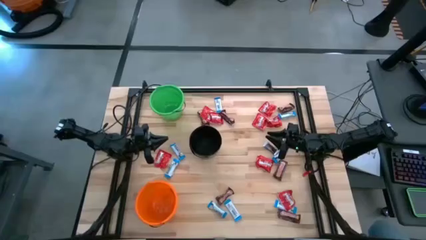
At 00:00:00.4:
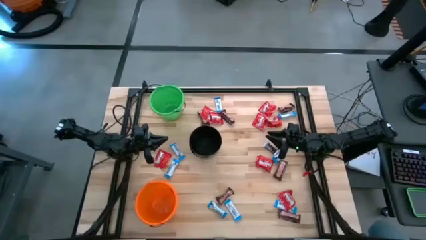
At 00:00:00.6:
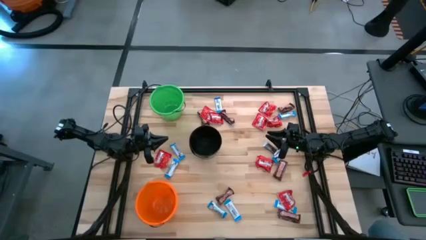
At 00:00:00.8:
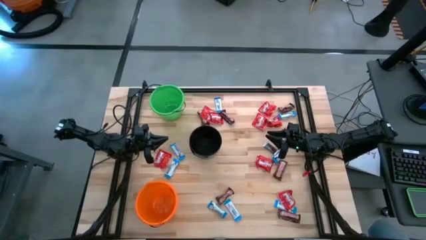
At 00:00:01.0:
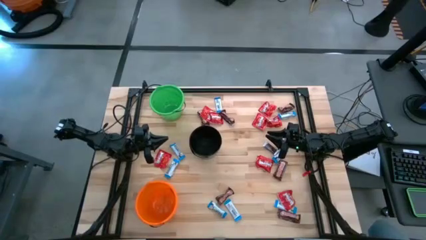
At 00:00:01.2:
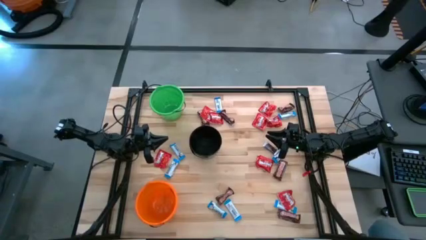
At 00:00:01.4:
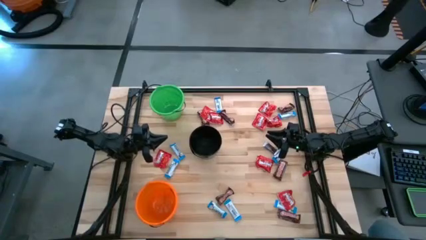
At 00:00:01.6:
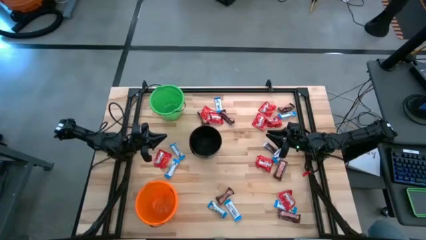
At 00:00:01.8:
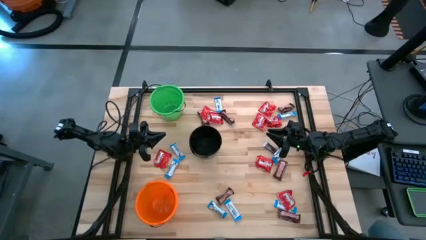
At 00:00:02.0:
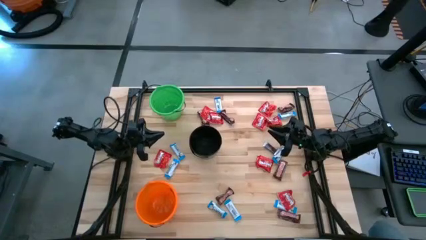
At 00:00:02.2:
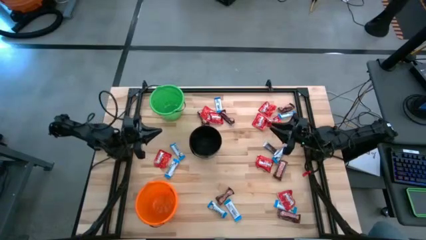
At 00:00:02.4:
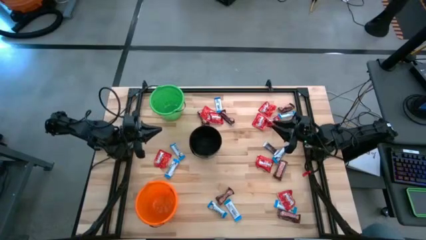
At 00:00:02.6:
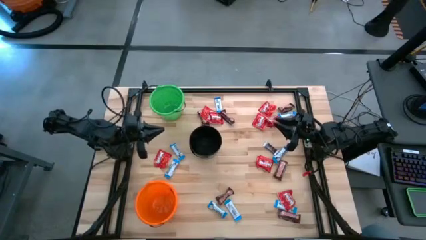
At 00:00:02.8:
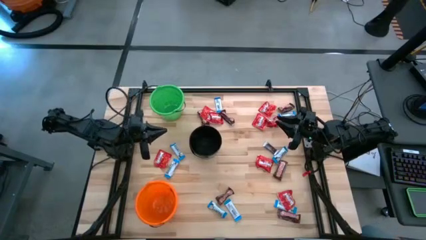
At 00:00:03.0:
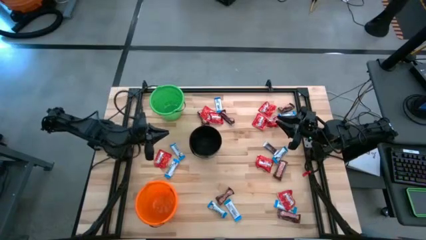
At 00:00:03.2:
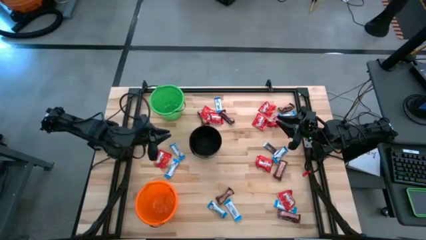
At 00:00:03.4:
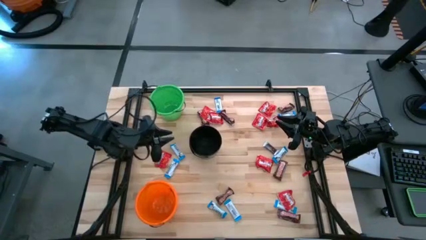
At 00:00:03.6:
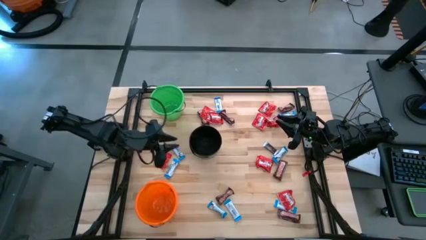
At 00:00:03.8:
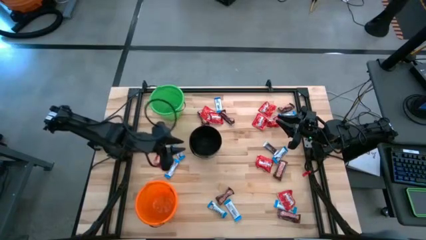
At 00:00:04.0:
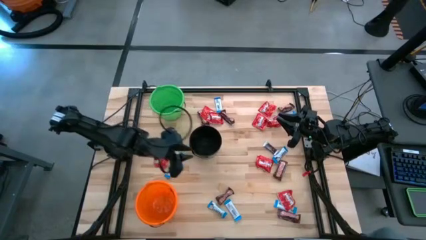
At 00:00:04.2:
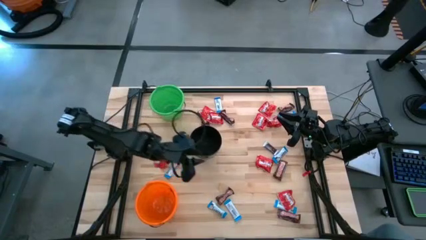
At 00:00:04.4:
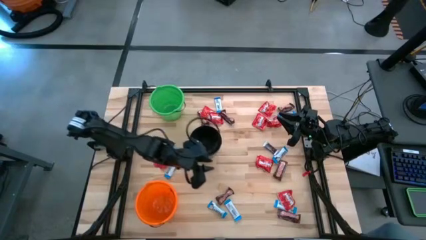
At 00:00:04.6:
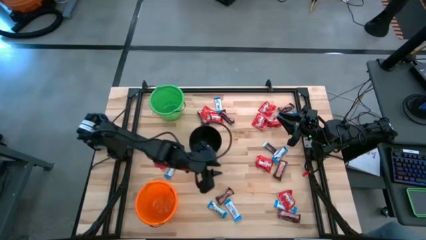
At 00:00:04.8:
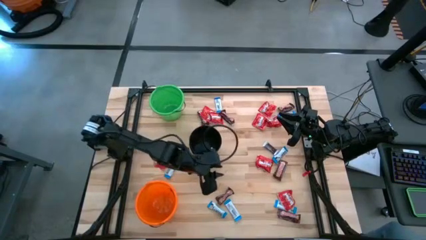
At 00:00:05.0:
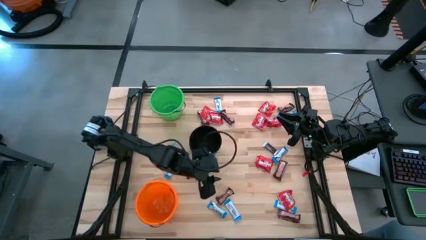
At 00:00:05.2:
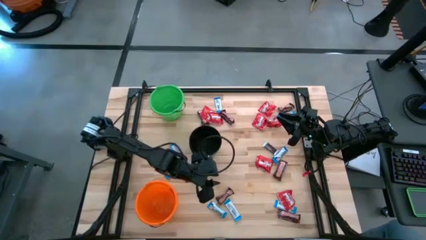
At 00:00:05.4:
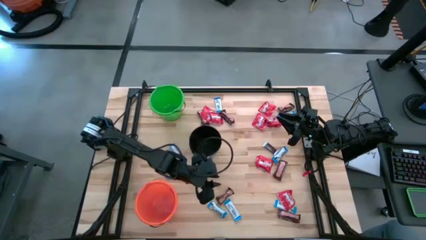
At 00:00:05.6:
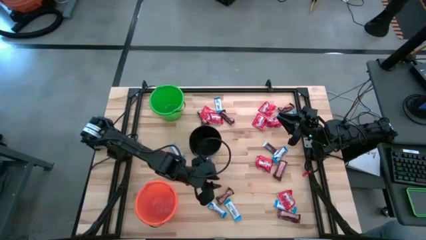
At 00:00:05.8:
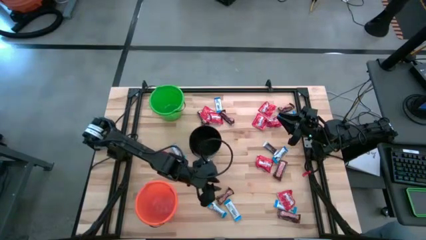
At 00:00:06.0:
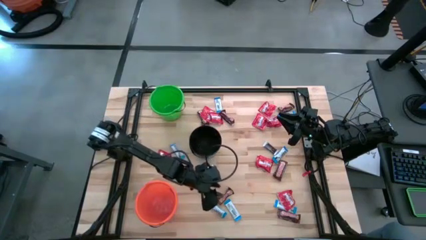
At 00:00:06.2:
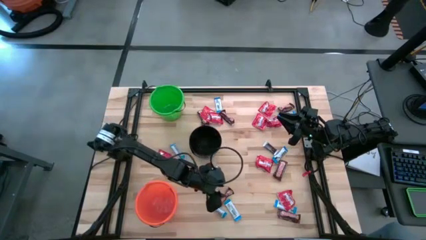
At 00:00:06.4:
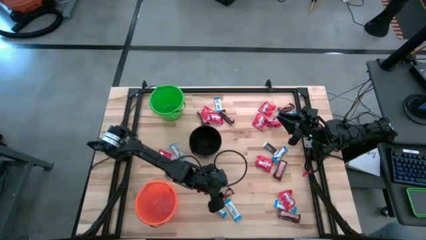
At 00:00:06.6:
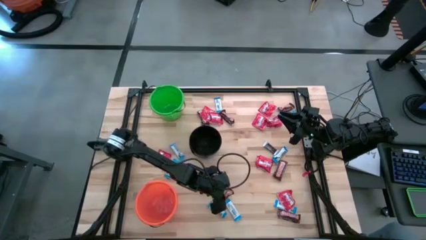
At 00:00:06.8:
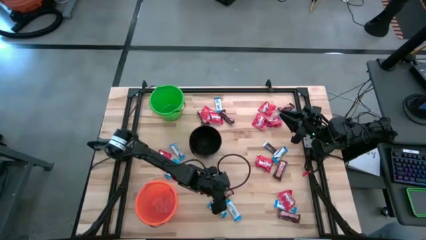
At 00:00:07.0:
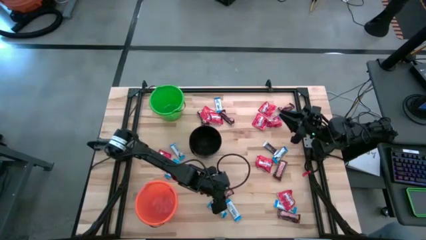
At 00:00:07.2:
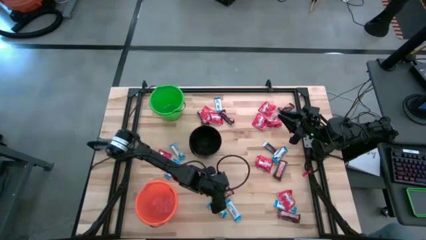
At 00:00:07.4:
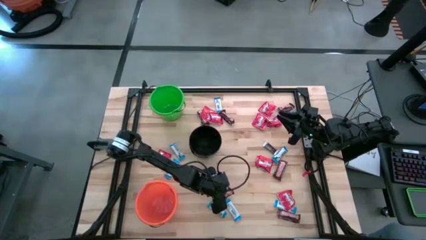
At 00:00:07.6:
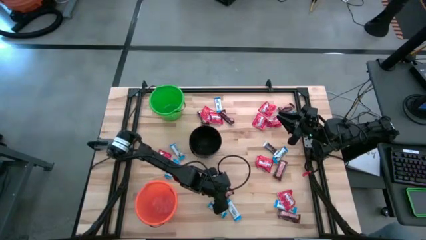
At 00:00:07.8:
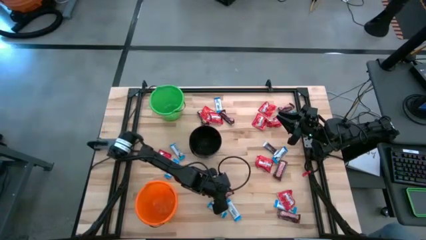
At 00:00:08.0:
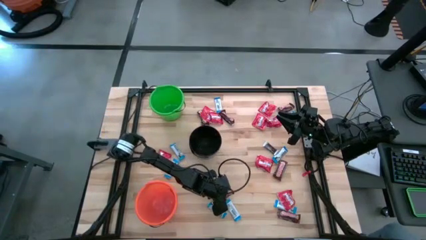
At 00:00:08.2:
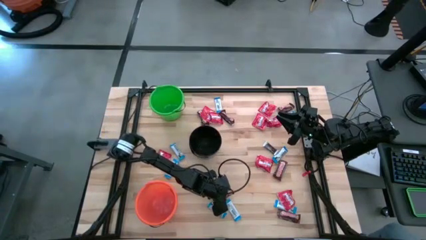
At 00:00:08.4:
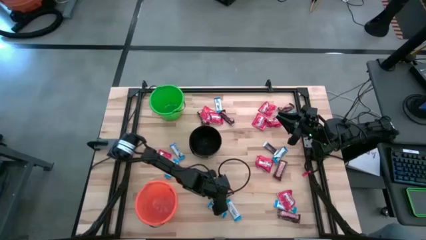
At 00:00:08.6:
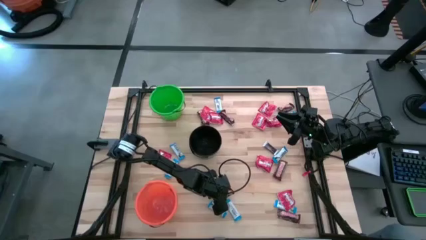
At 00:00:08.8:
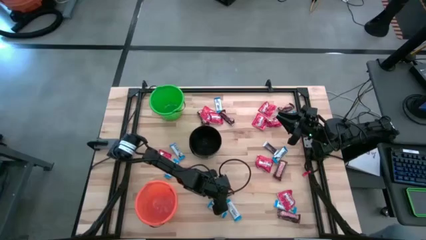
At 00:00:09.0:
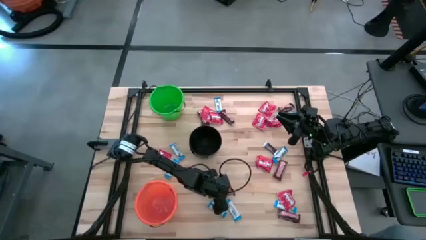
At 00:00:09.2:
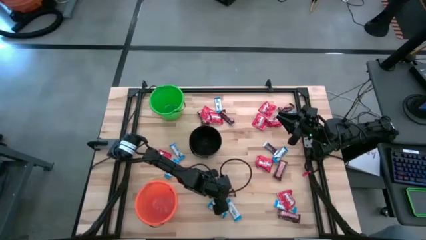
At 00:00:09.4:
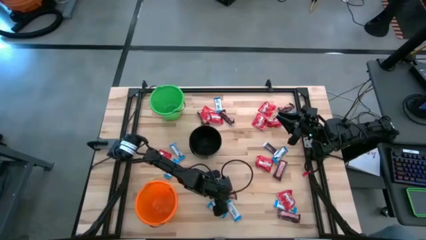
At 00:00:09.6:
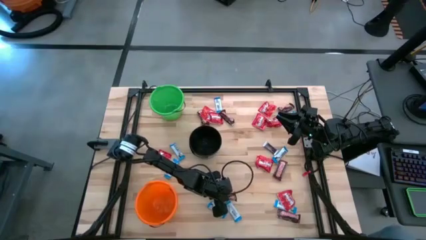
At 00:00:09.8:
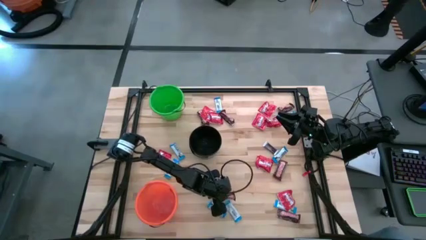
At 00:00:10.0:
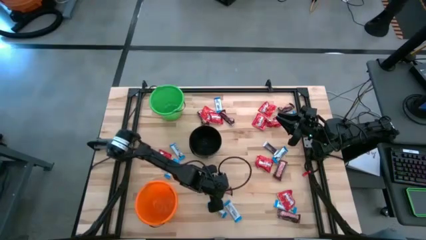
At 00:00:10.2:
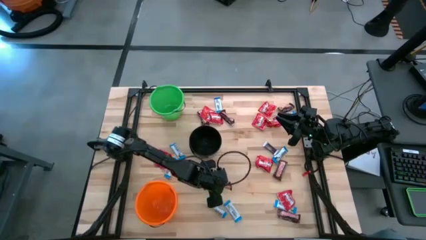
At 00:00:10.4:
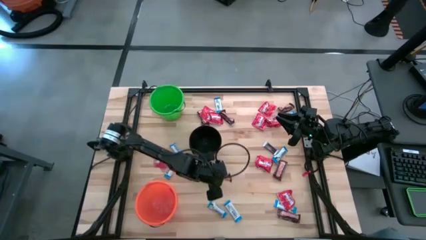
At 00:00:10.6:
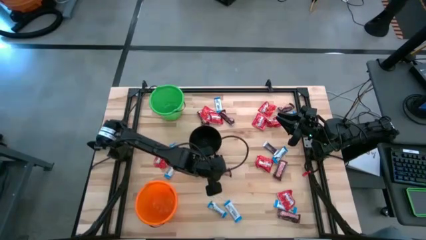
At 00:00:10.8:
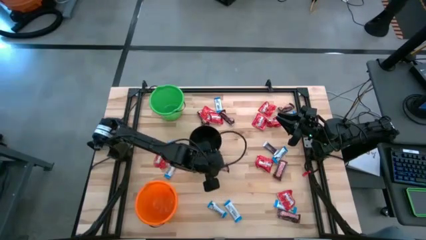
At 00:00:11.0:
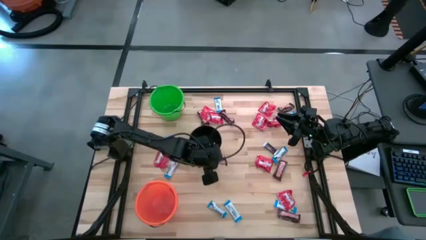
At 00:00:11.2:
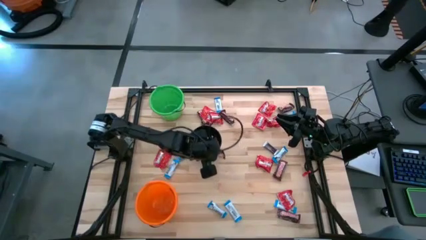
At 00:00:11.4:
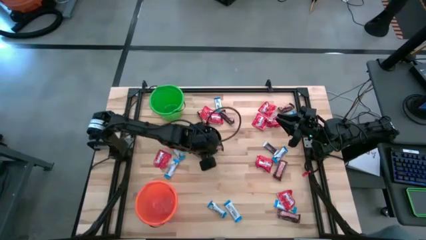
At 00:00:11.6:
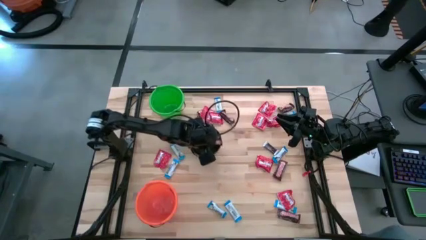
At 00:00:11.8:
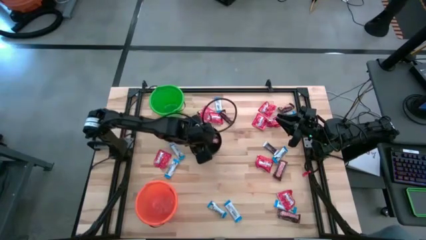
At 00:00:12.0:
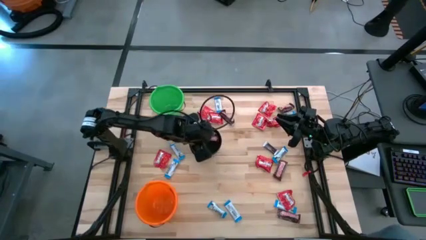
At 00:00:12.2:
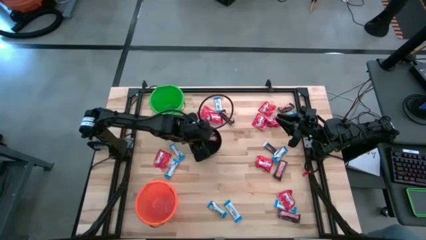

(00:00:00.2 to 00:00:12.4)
Task: Sort candy
Put the brown chocolate into the black bucket
